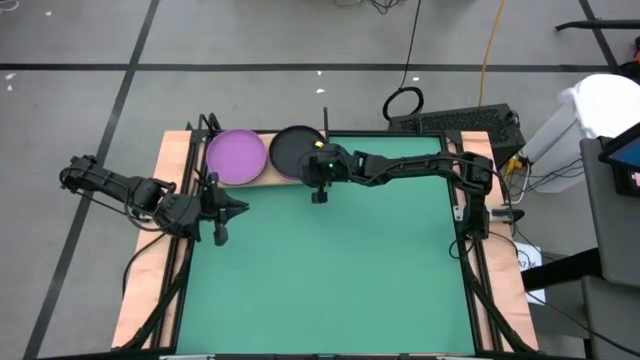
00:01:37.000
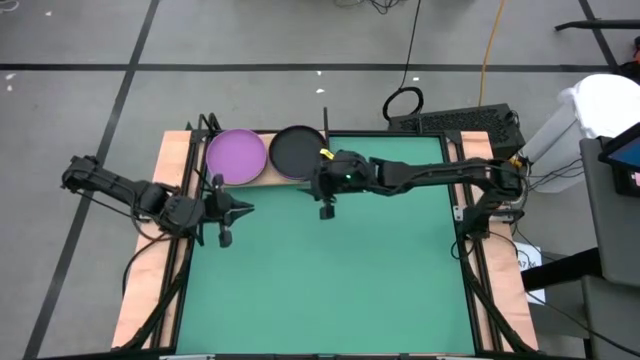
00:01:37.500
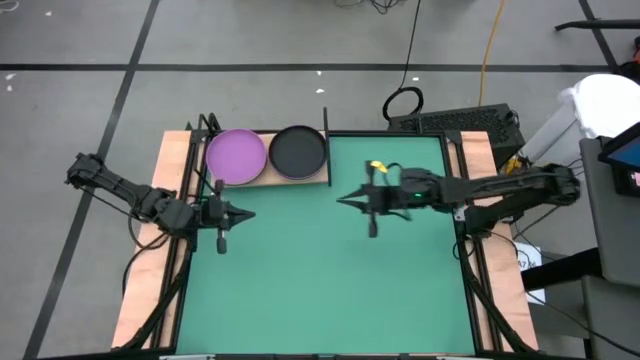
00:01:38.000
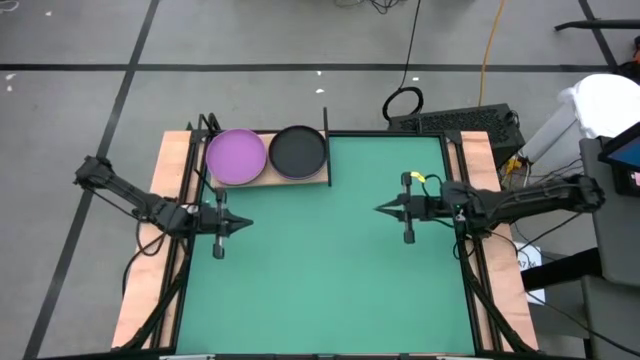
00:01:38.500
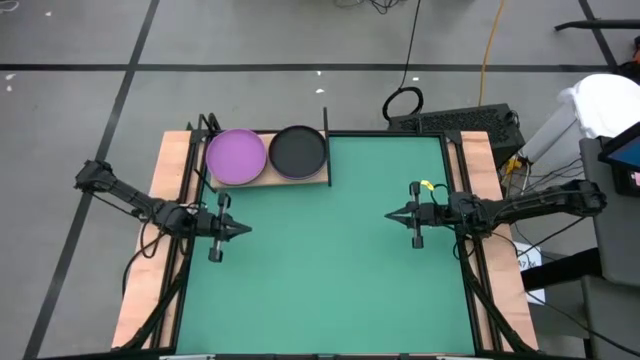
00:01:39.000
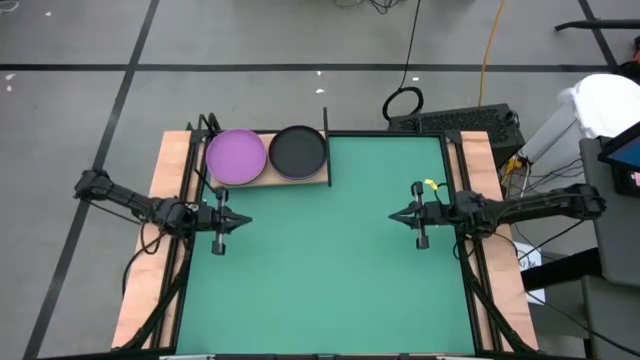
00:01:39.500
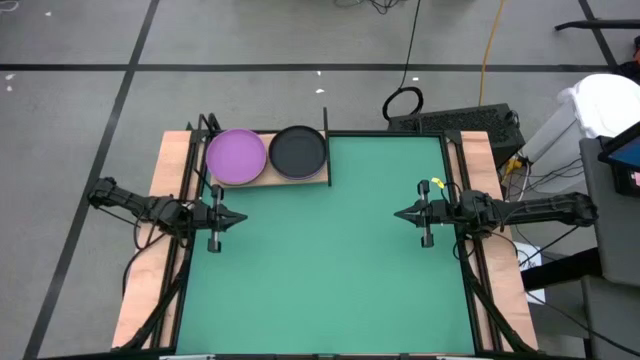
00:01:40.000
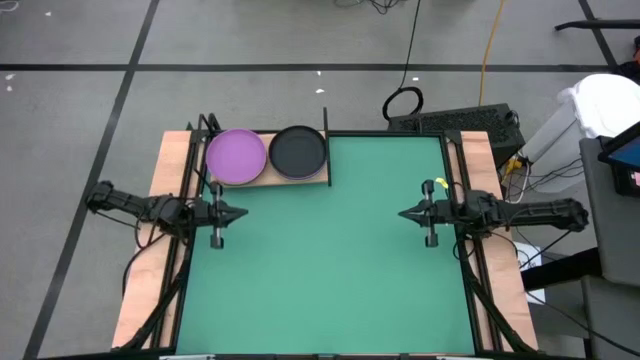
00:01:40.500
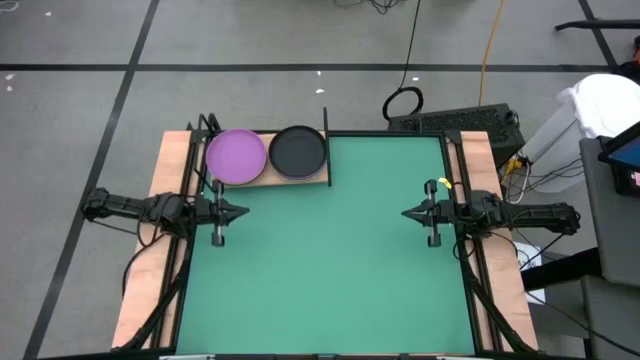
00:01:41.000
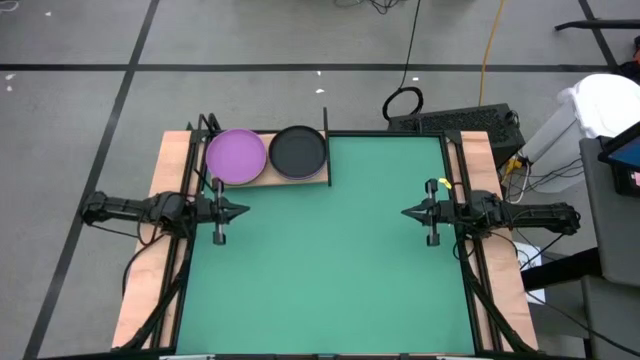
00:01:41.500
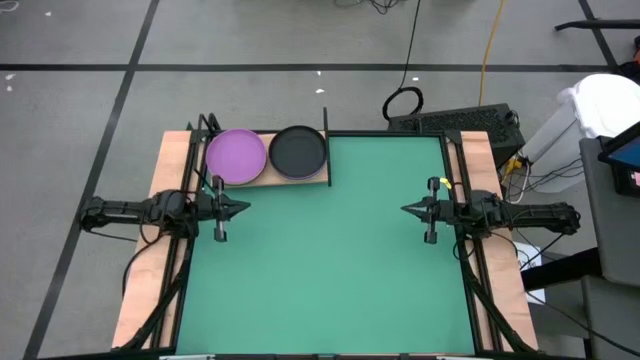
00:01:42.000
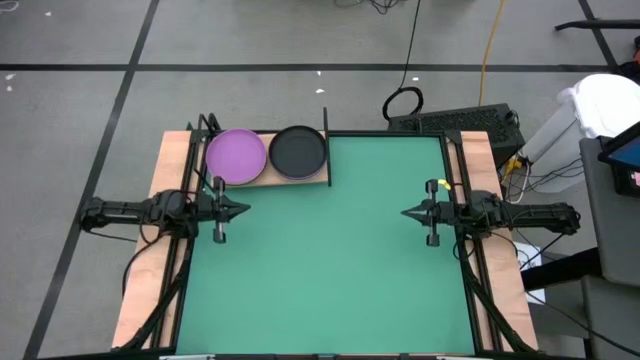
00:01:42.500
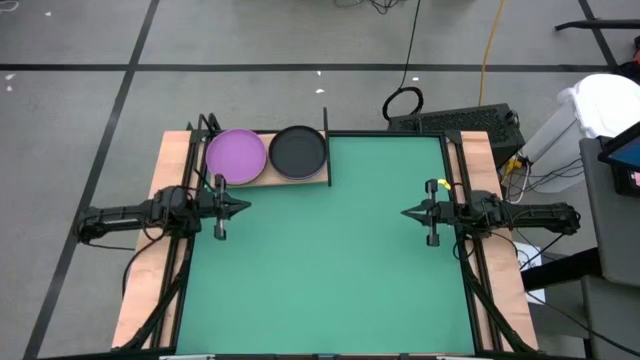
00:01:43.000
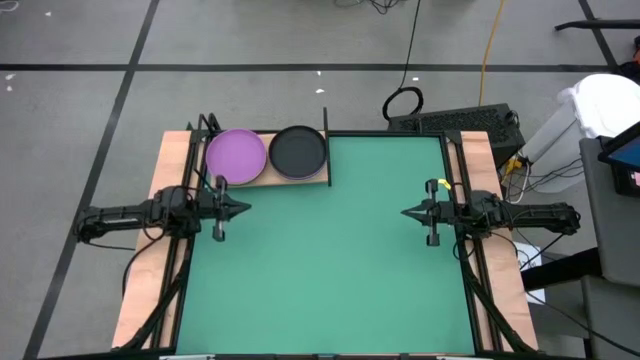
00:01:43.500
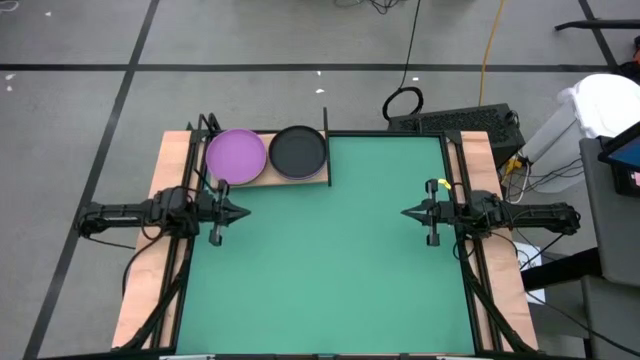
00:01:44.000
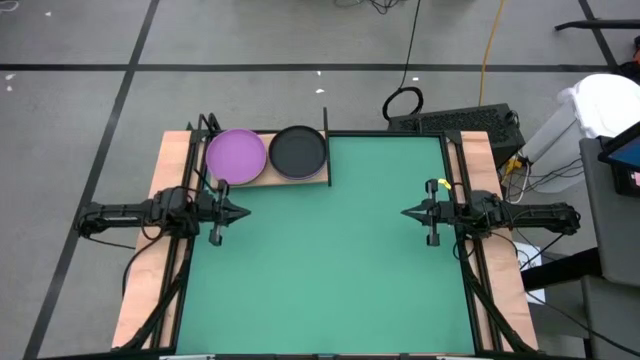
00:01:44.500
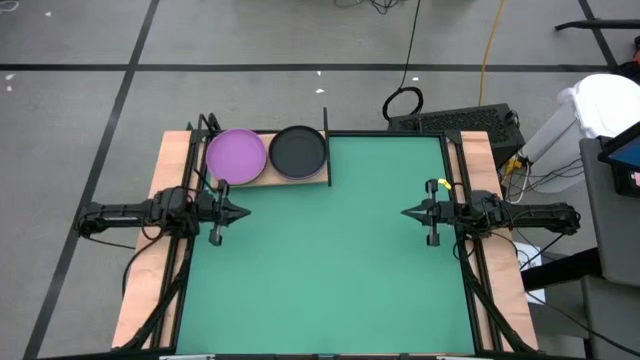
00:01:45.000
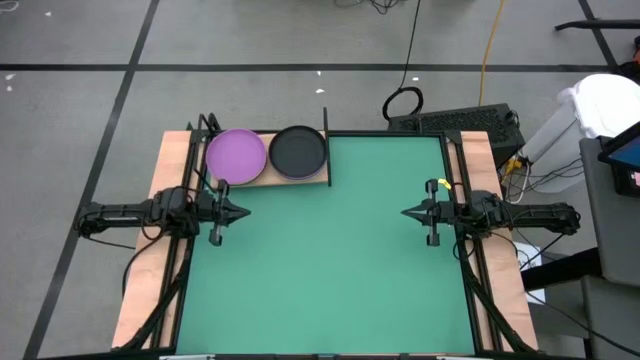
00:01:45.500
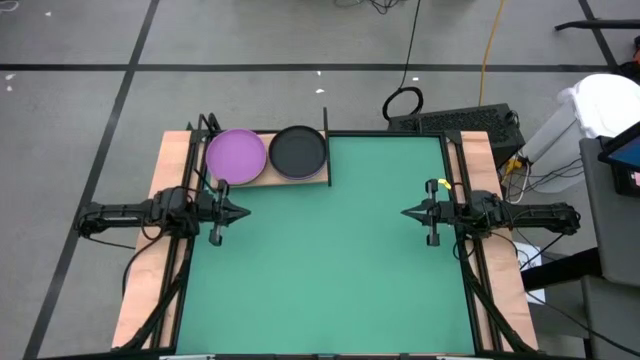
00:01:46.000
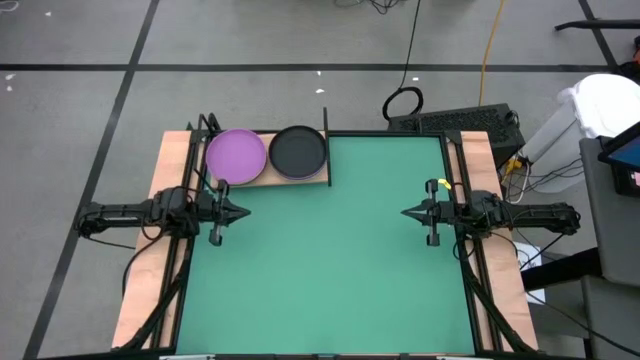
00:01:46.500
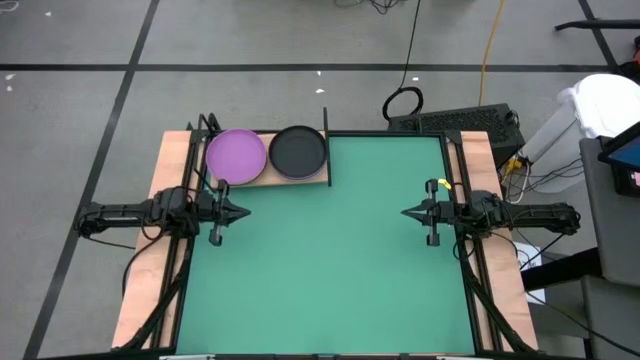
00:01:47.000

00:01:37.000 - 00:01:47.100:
Task: Place and stack plates onto a shelf
Return to Home Position

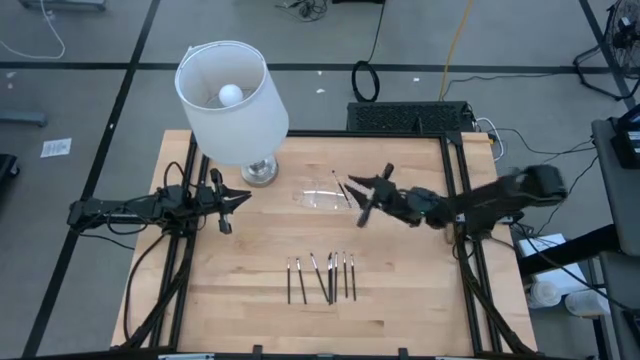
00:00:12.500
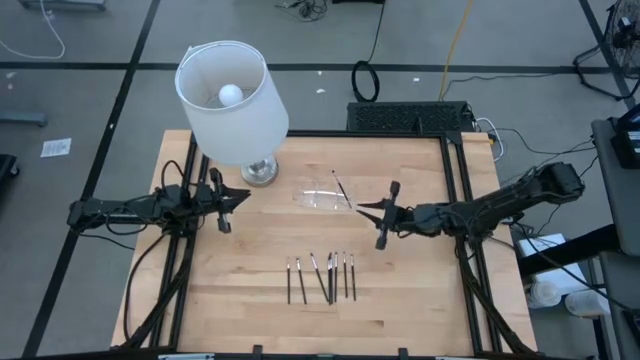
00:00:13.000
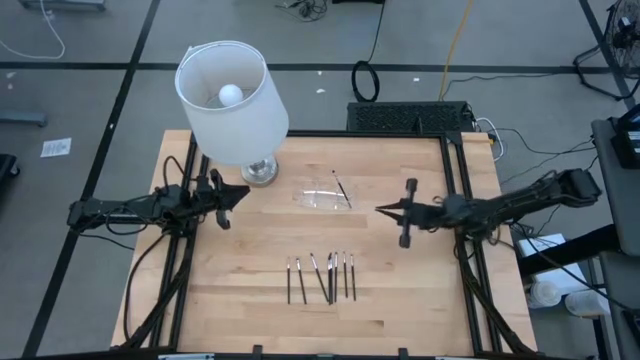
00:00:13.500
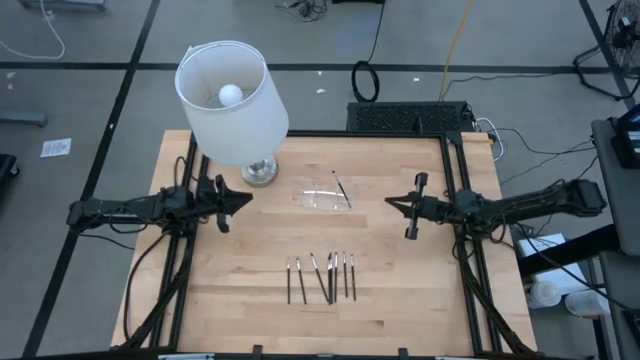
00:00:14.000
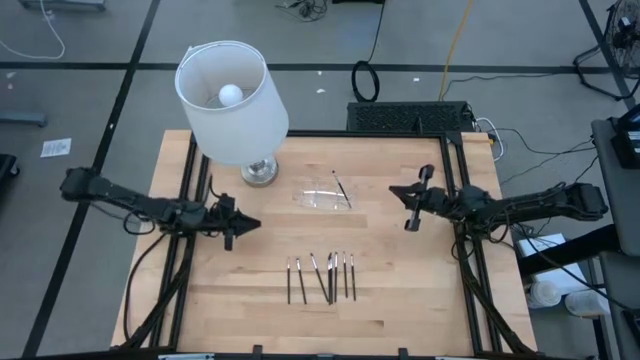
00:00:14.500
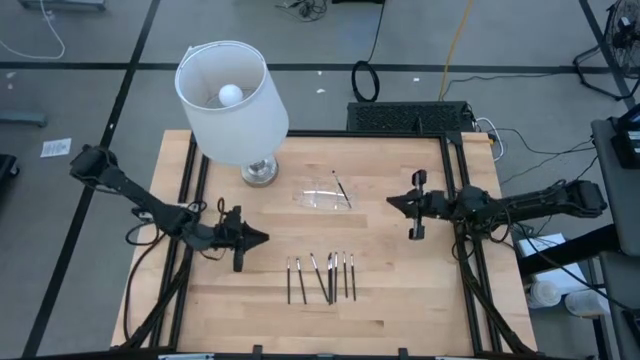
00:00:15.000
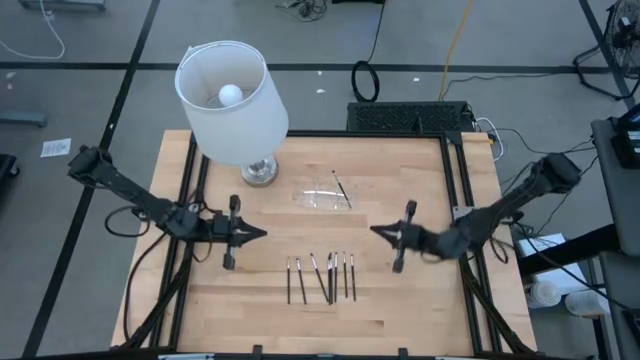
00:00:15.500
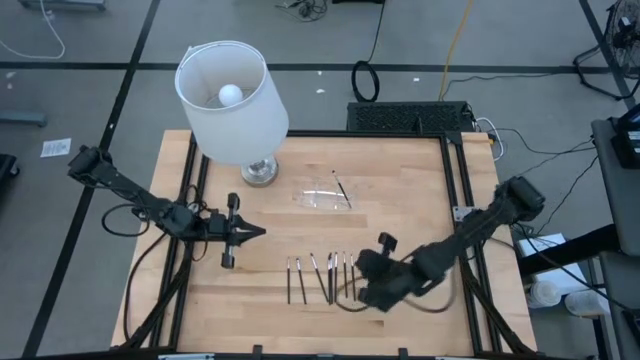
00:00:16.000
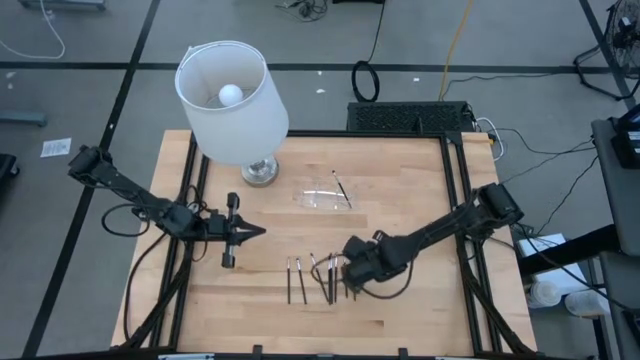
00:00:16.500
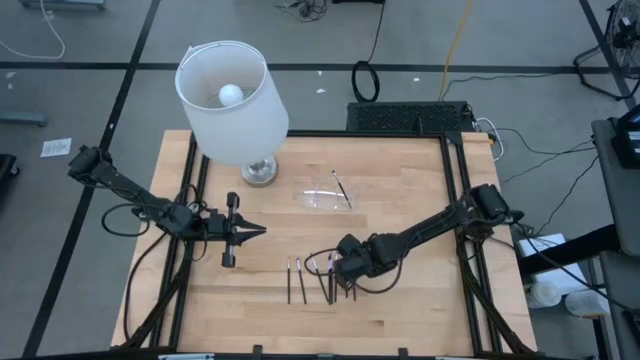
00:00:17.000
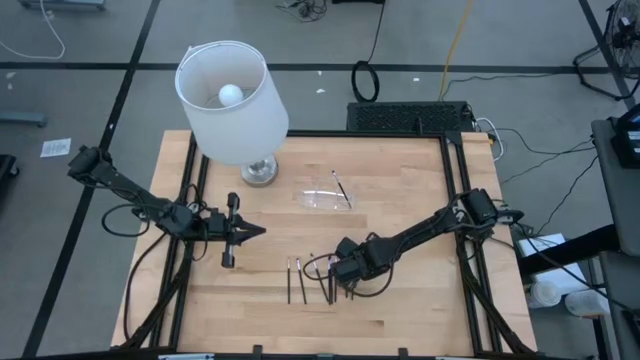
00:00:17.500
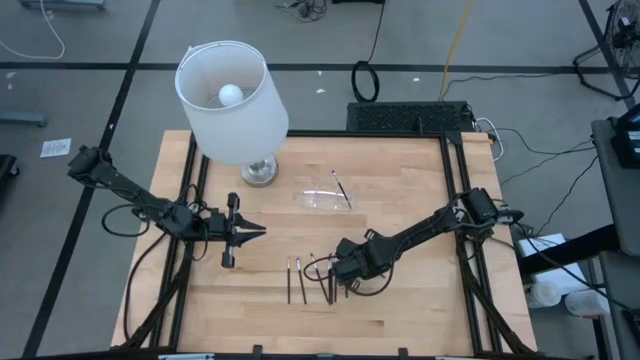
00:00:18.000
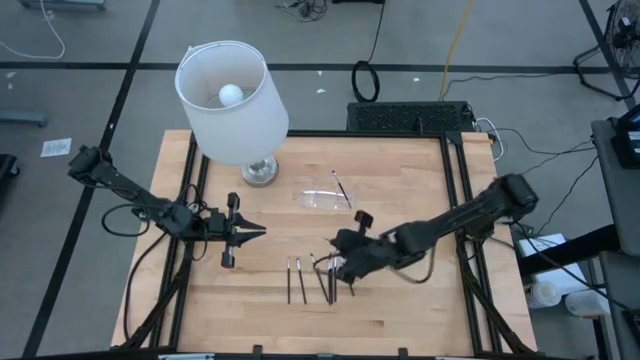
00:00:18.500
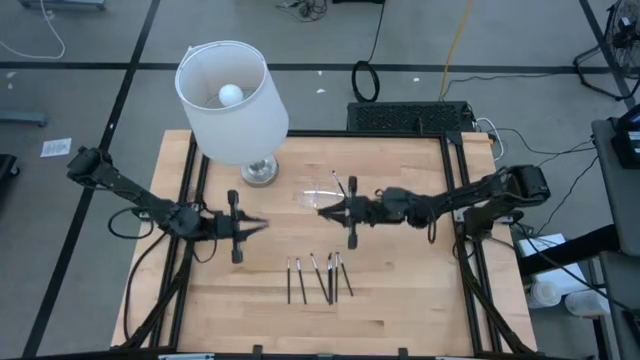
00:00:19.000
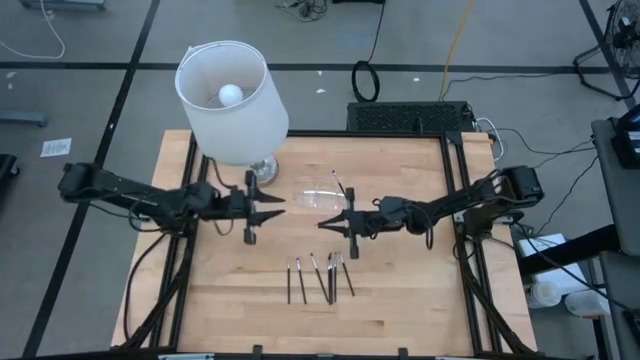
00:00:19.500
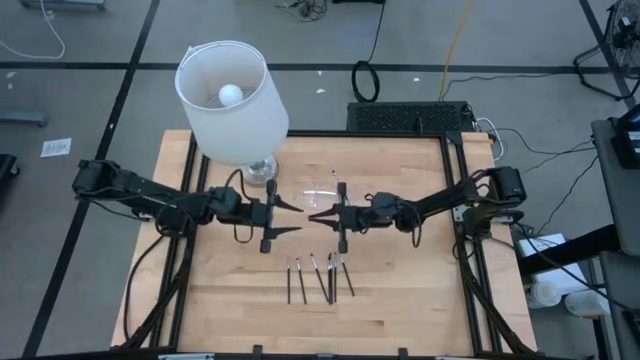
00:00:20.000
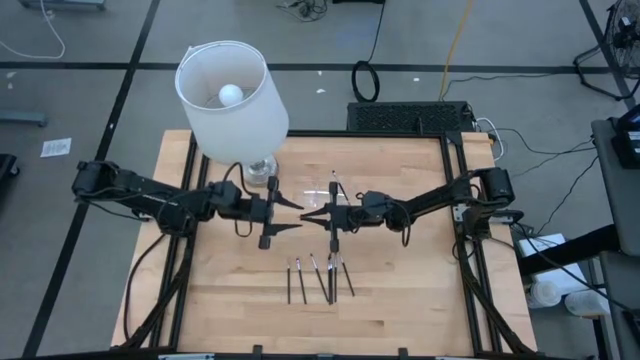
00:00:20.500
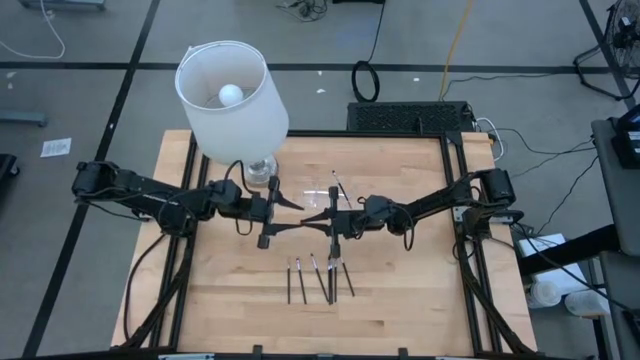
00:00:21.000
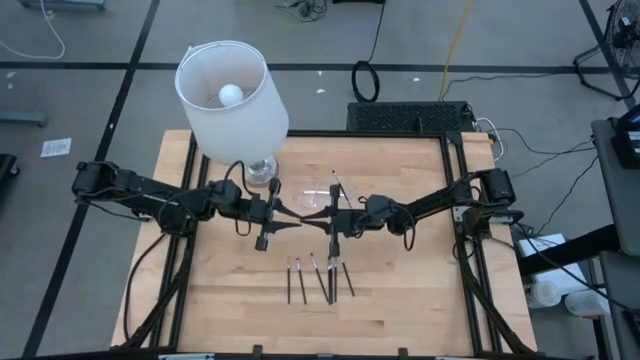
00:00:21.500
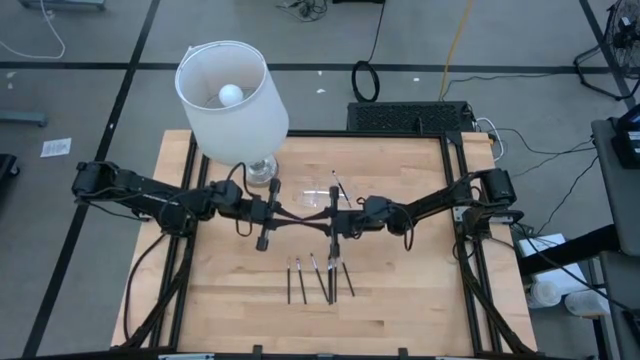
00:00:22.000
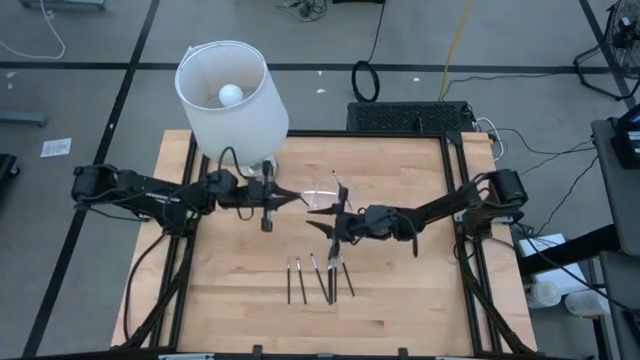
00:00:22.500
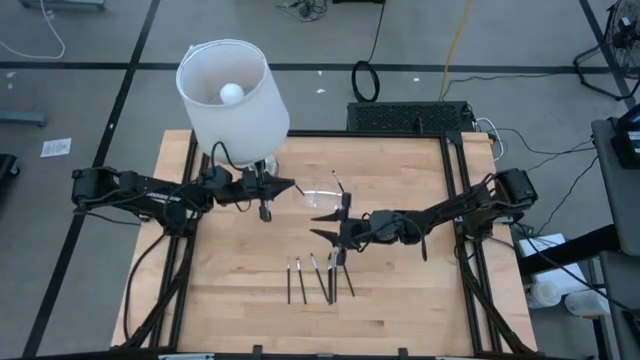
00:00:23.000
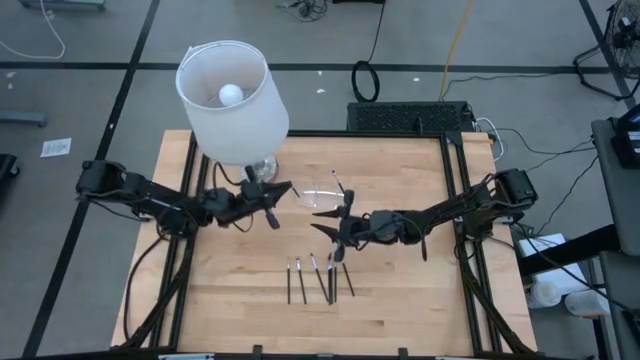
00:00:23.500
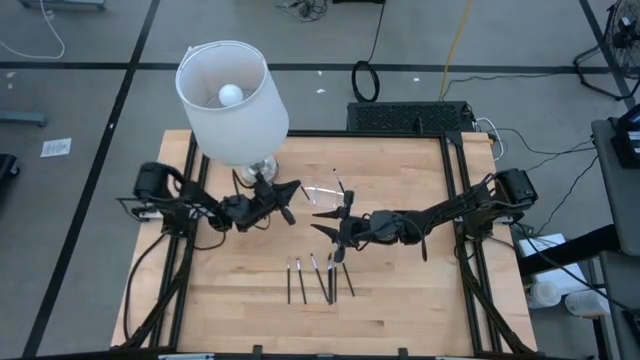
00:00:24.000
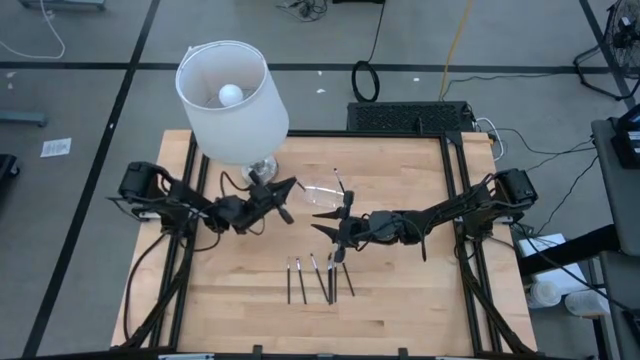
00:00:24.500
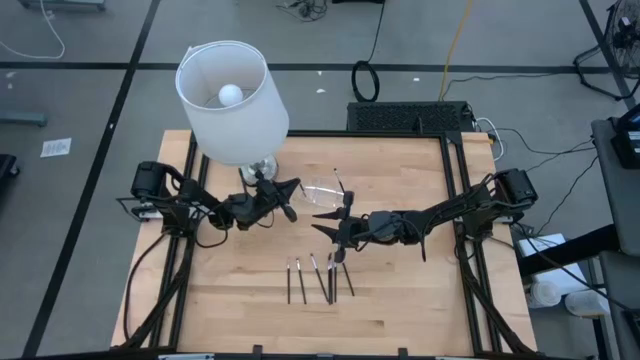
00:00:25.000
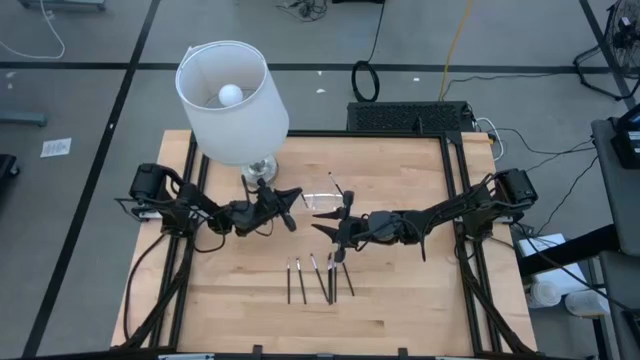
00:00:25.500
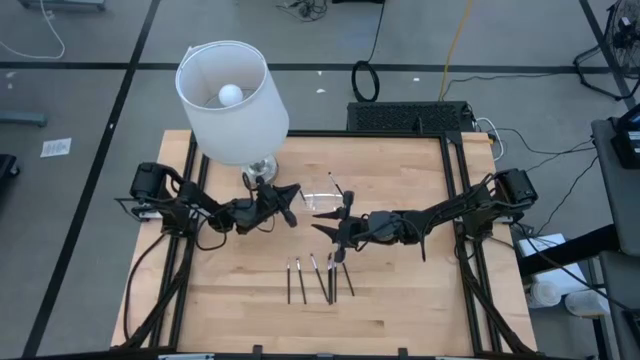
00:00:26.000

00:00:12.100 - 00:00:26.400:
Task: Put items in baskets/containers
Put the black eyeshadow brush into the transparent organizer
